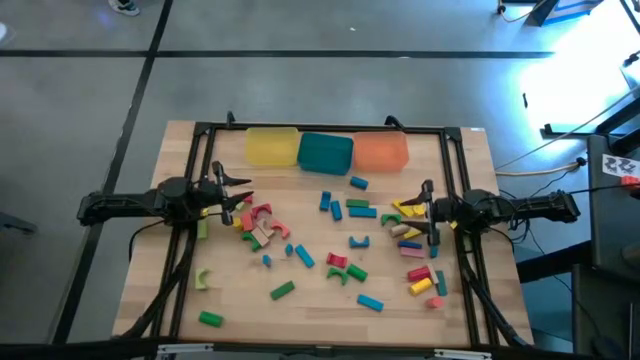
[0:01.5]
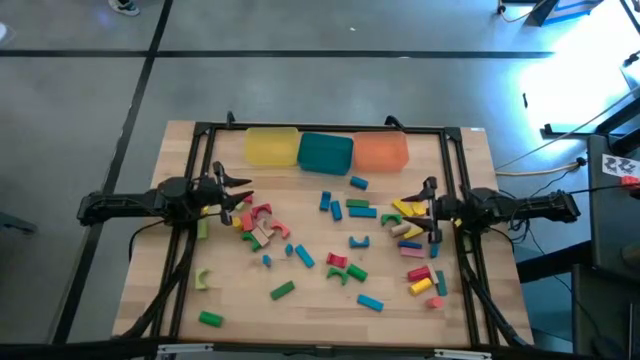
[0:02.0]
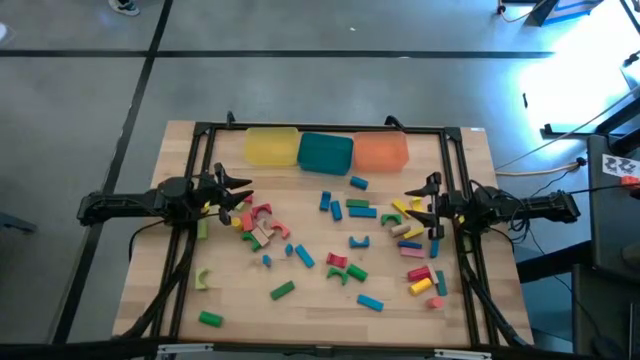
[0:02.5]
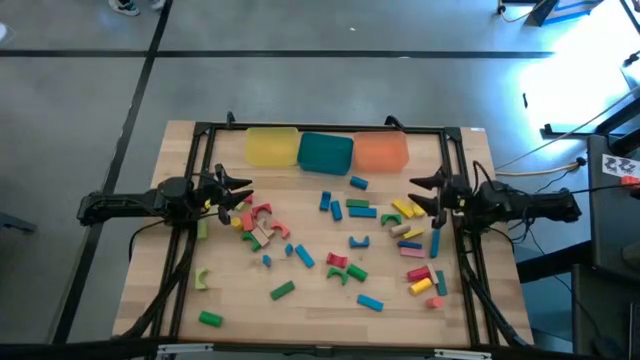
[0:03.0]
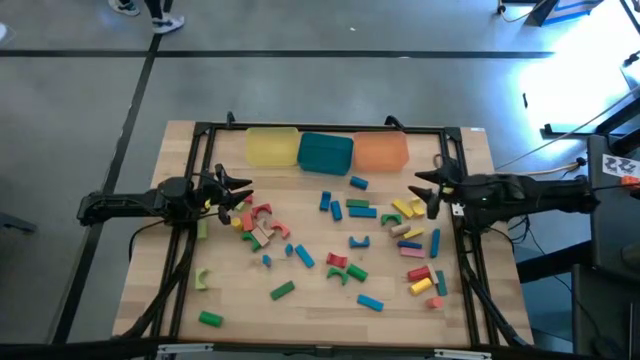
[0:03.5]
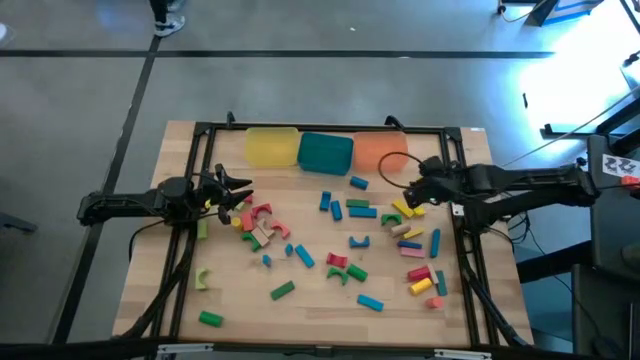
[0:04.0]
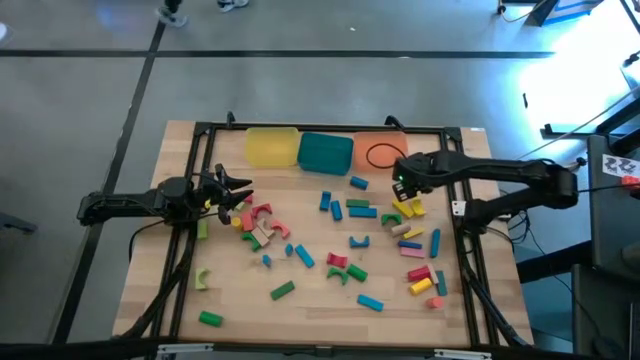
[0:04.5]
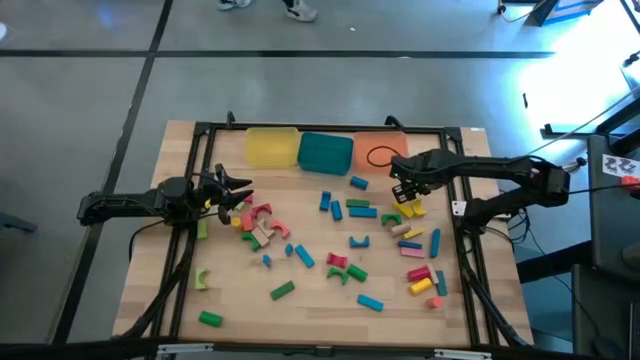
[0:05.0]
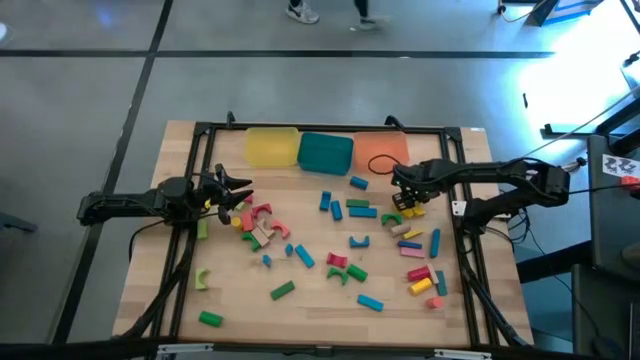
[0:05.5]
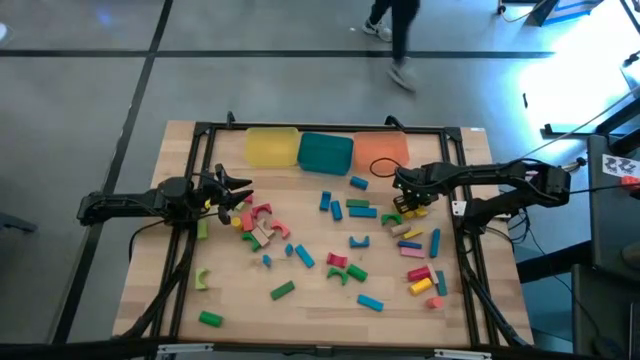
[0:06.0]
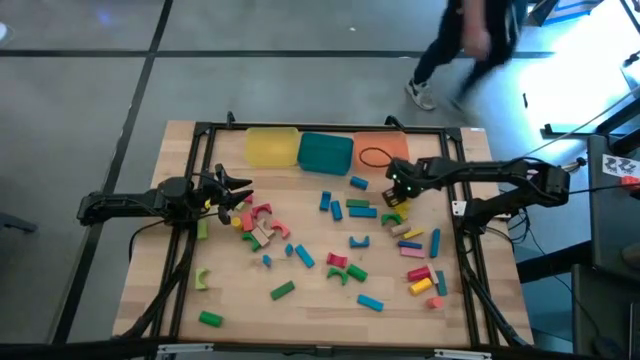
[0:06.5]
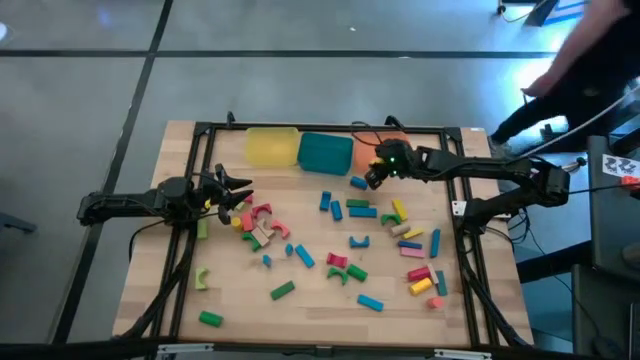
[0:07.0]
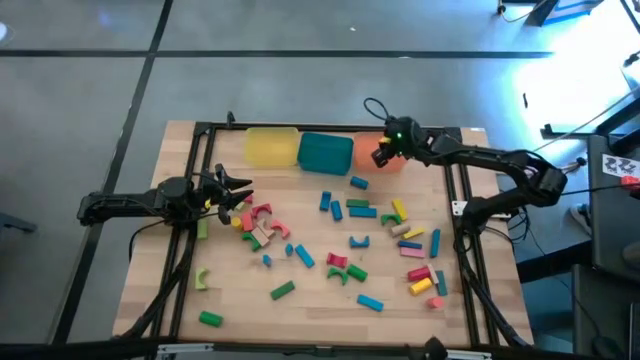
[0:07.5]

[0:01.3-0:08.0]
Task: Sort blocks by size
Put the yellow arch shape block in the orange bin

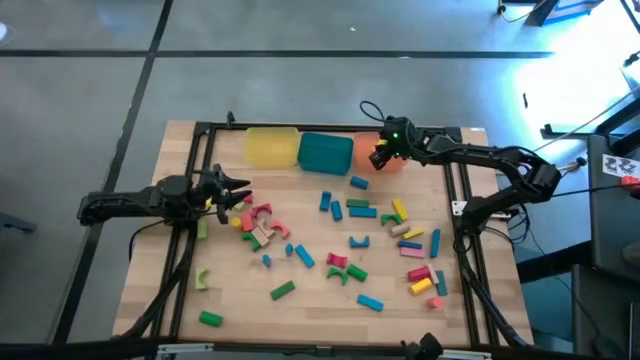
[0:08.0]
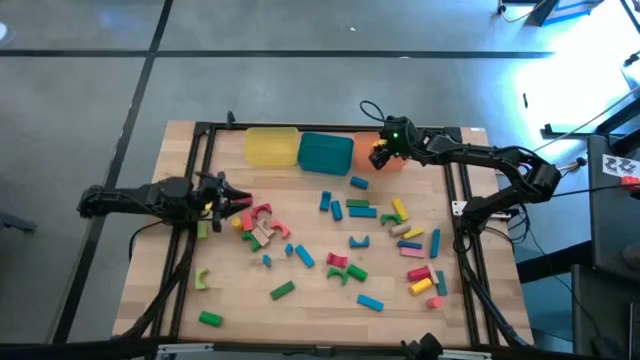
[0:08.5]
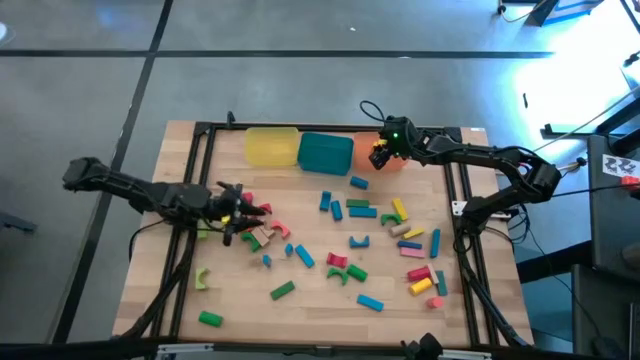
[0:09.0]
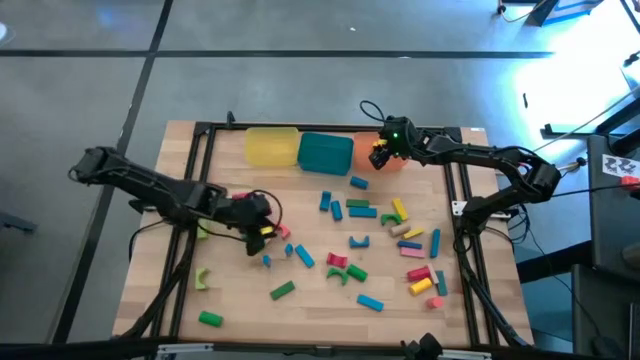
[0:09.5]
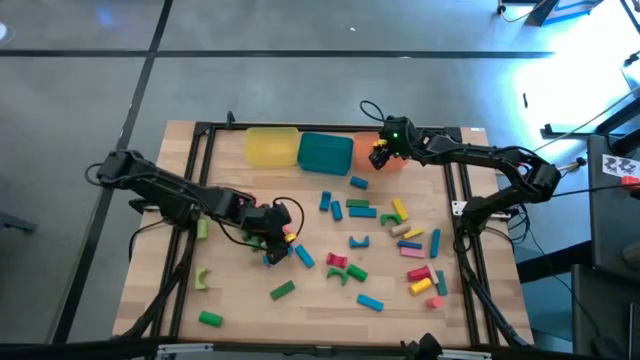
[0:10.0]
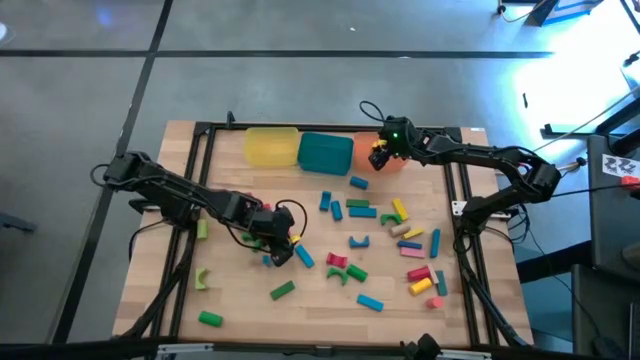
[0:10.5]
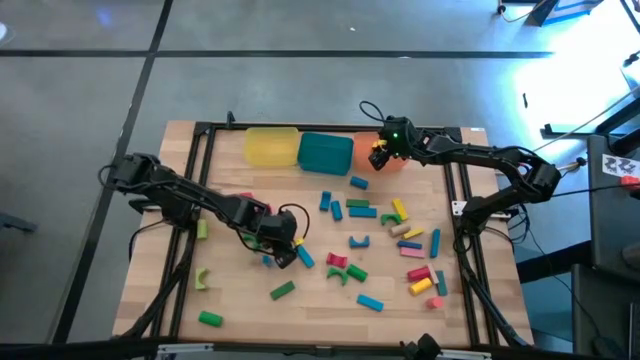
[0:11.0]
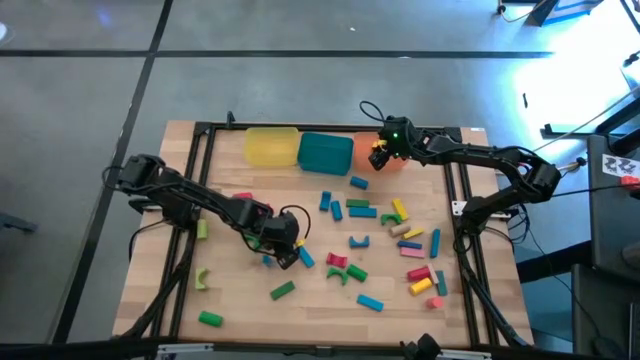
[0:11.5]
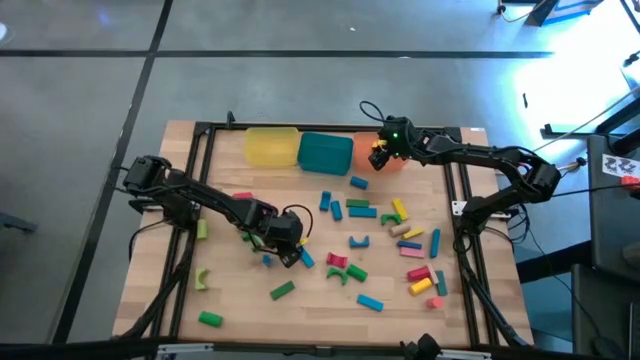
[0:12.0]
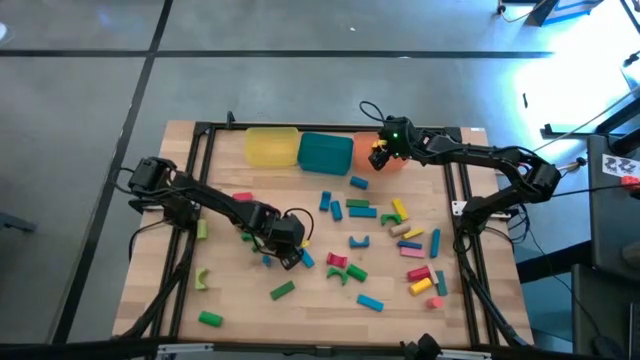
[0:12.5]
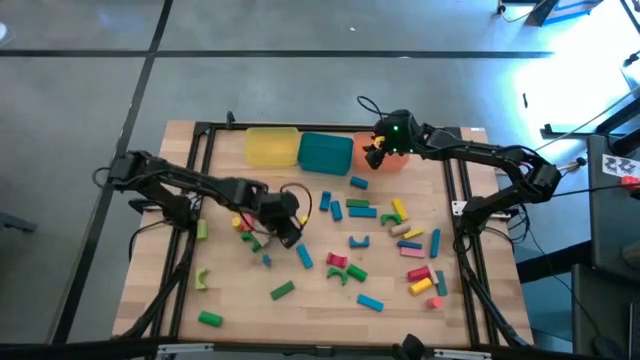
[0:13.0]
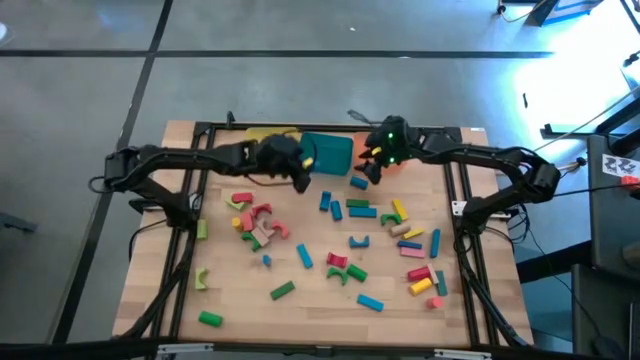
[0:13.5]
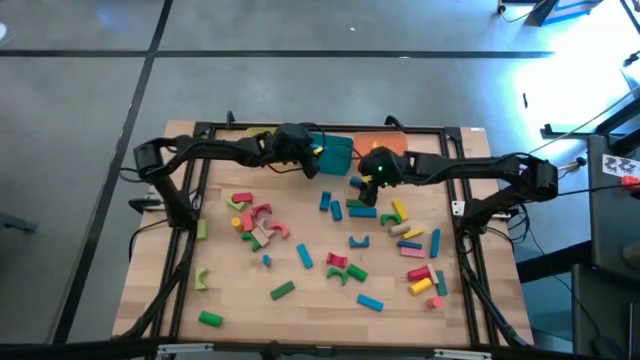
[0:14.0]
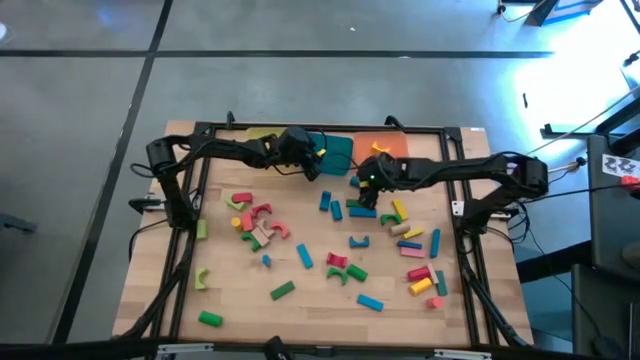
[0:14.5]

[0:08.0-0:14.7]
Put the blue rectangle block into the blue bin

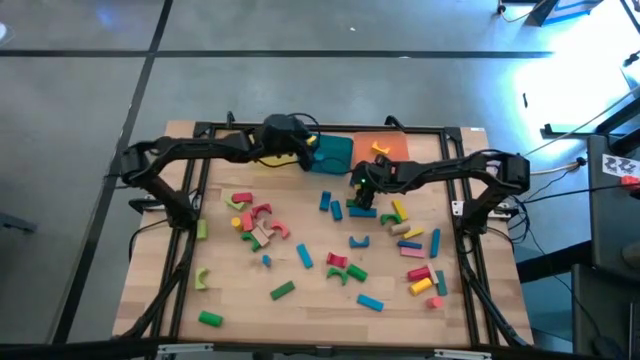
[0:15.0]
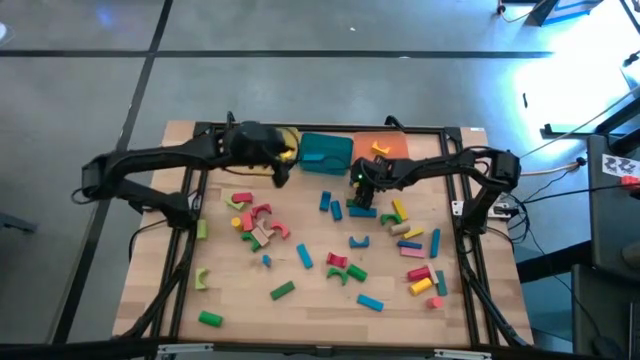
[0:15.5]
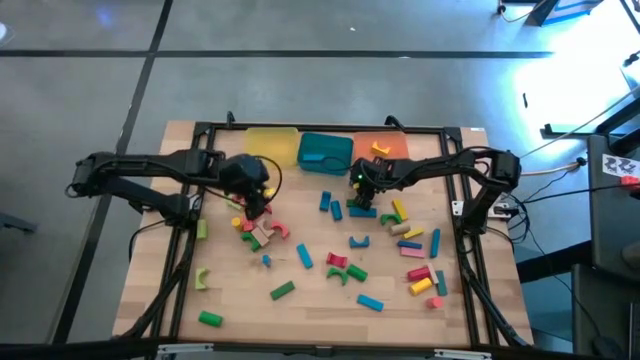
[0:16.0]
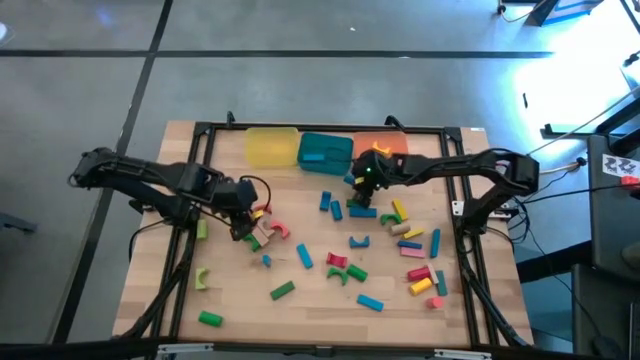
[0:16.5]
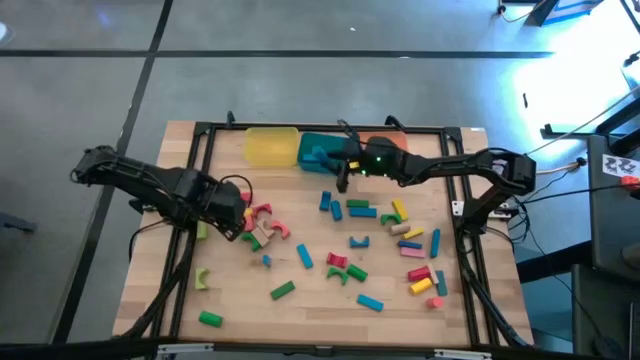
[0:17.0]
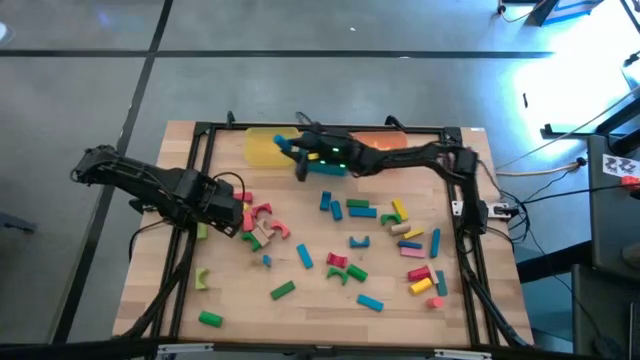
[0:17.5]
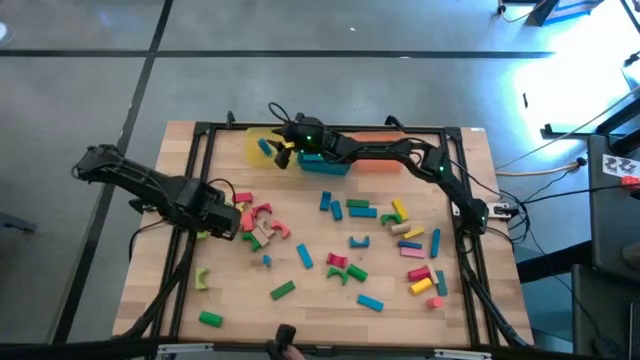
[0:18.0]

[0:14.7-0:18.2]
Put the blue cylindrical block into the yellow bin

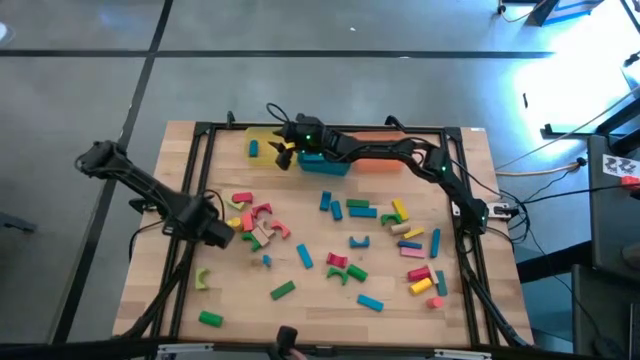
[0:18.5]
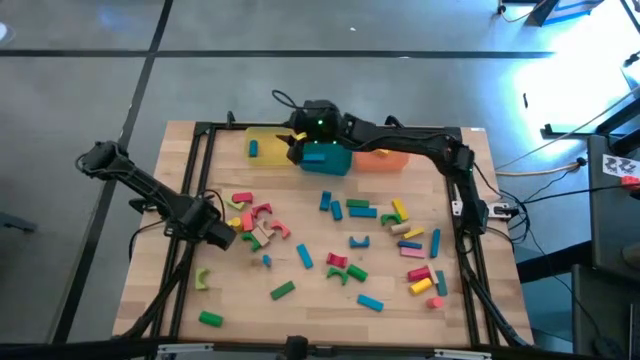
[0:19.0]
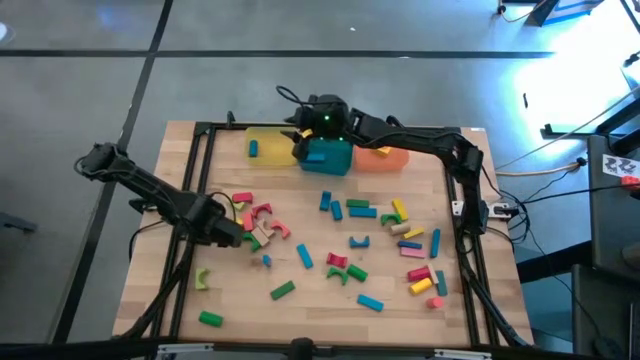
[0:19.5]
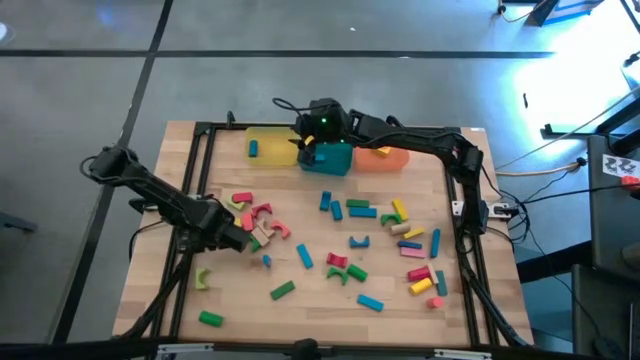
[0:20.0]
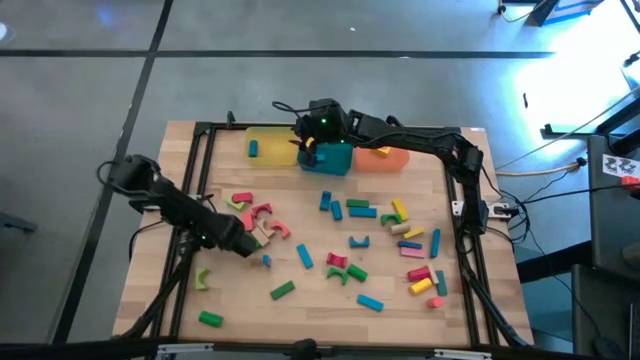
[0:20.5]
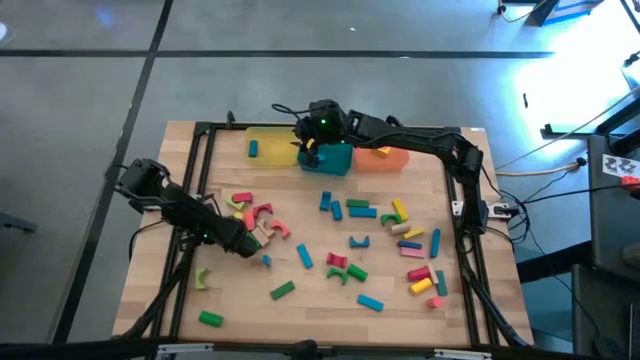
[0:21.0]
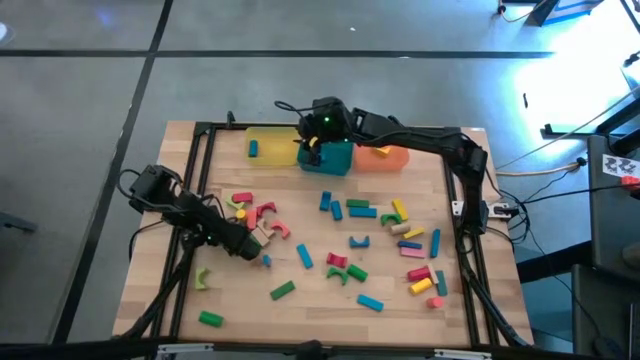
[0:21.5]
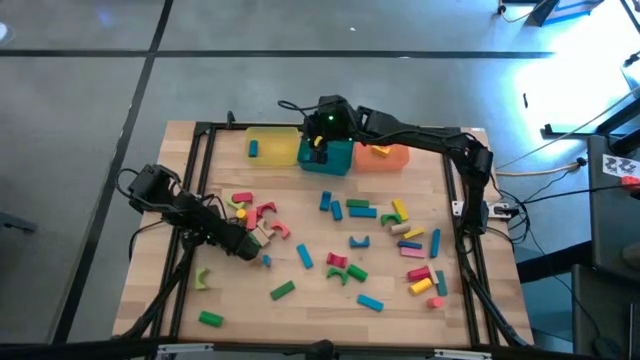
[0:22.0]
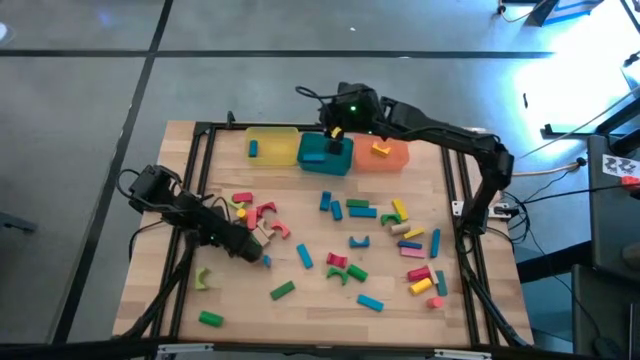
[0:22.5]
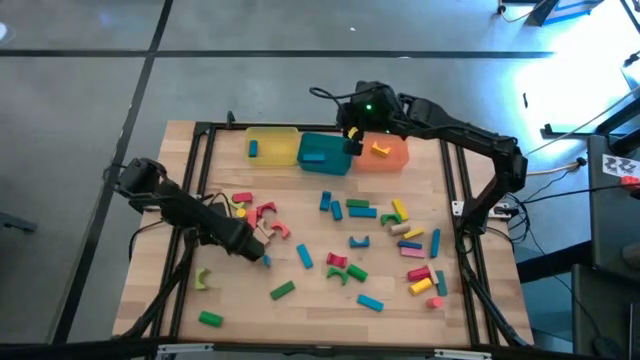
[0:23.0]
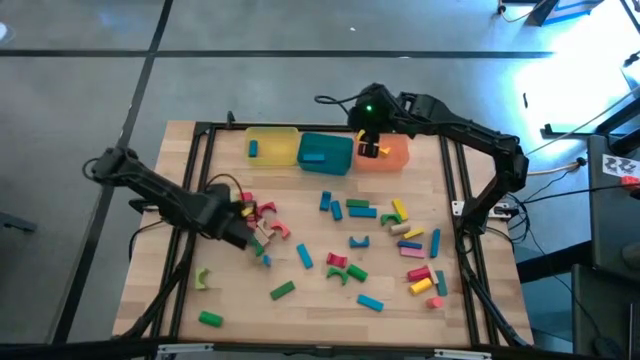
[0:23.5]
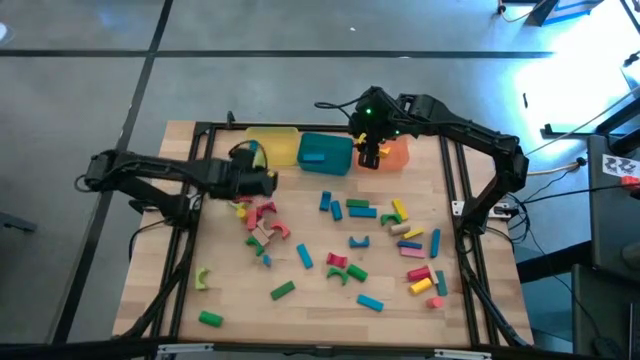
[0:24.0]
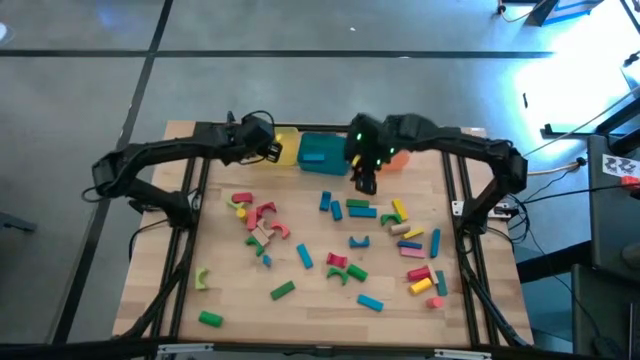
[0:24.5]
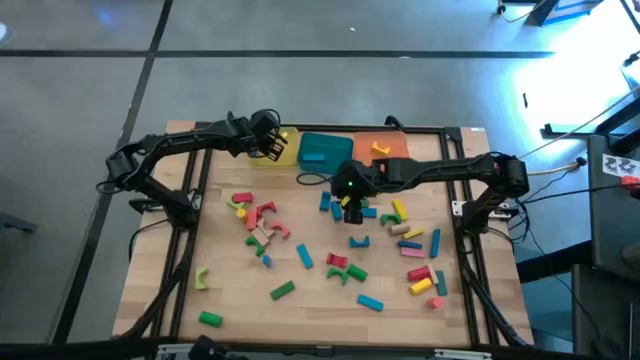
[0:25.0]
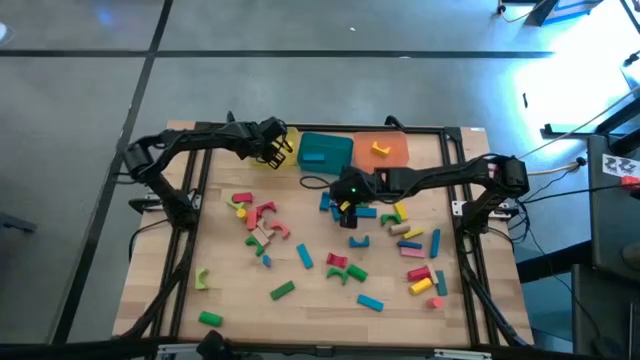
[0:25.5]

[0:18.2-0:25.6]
Put the light green cylindrical block into the yellow bin
